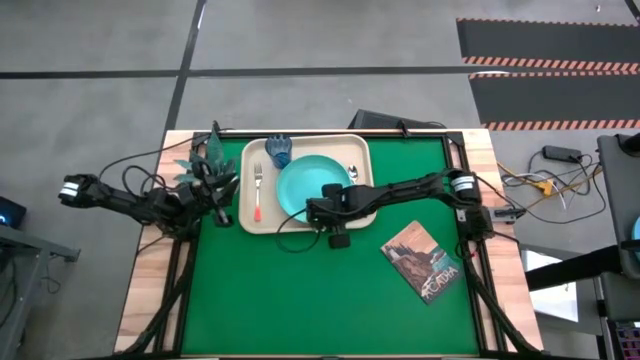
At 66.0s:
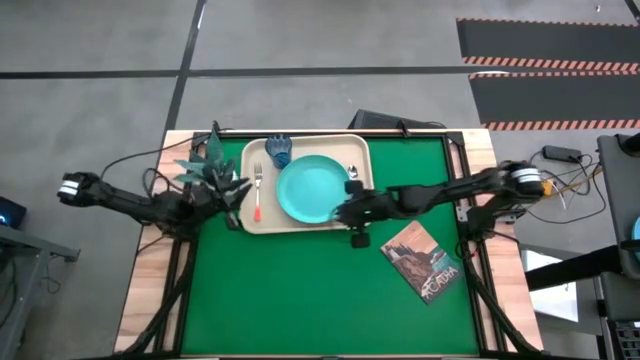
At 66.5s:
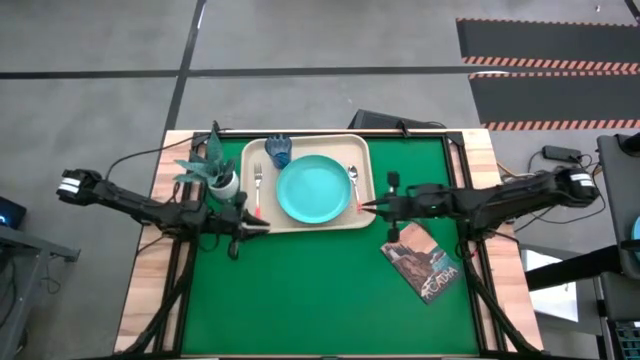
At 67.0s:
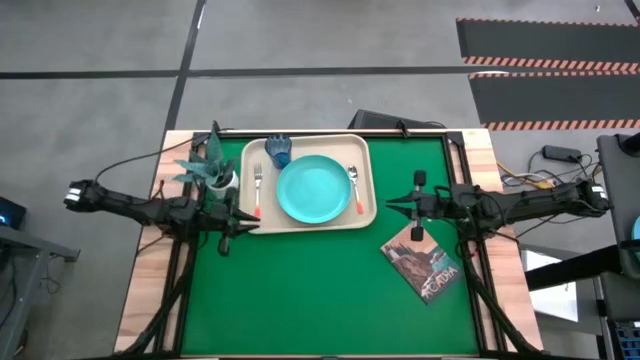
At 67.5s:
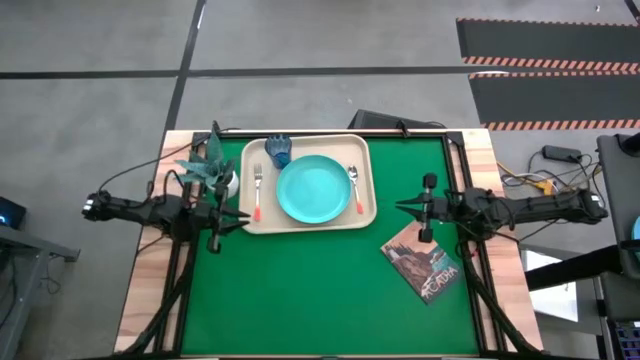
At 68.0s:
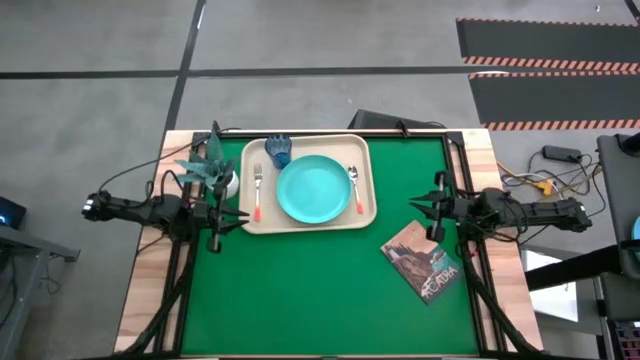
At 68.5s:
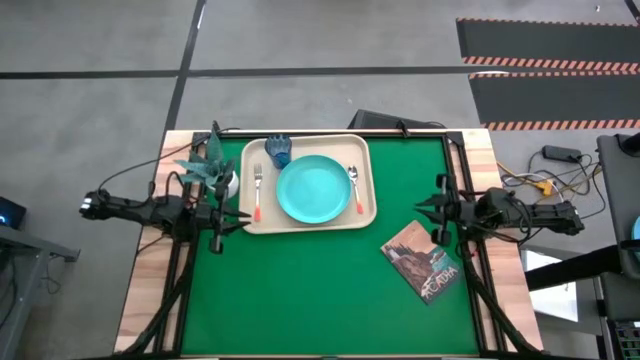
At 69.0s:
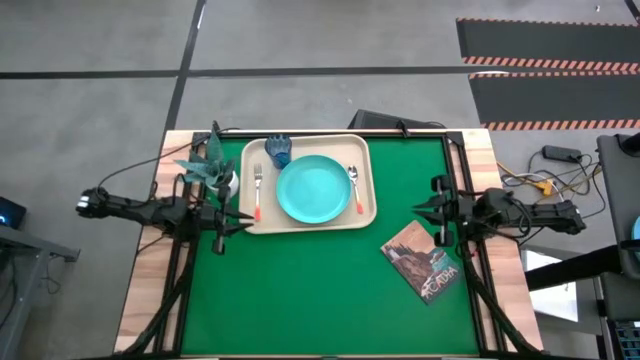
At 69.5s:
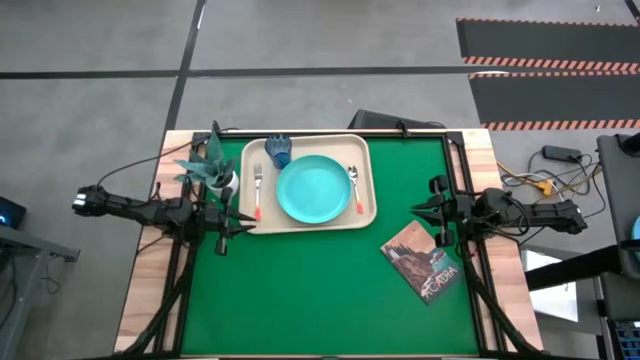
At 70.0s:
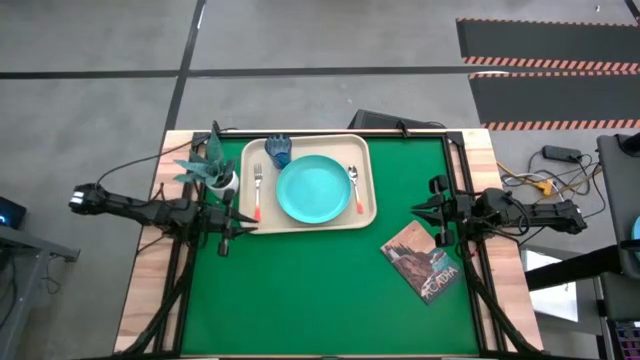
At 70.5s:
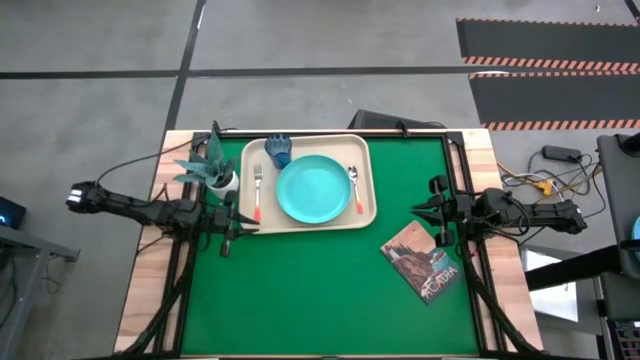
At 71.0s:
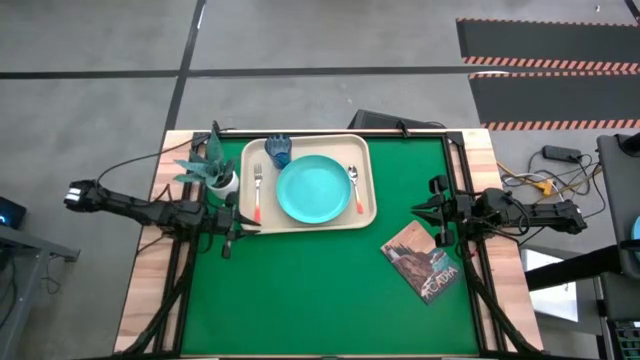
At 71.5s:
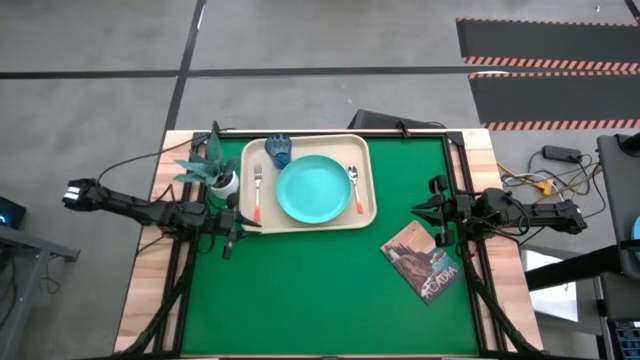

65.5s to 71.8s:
Task: Pick and place plate/cup/fork/spoon on tray
Return to Home Position

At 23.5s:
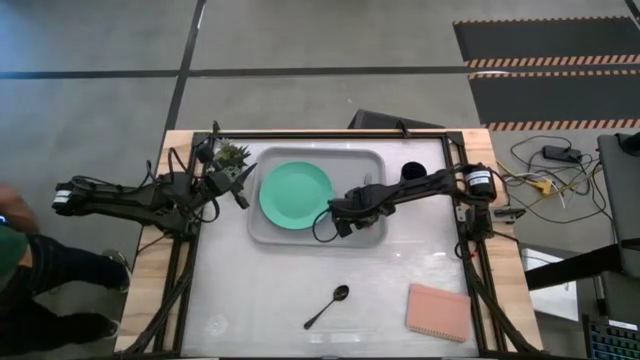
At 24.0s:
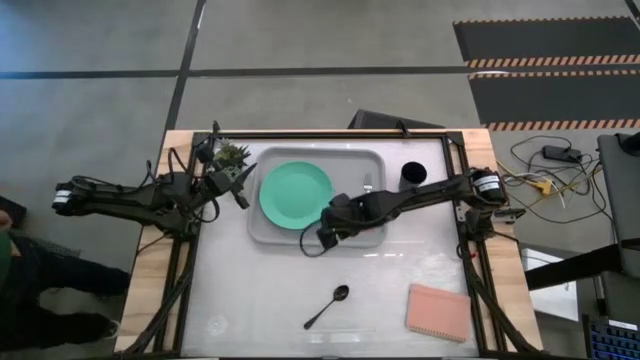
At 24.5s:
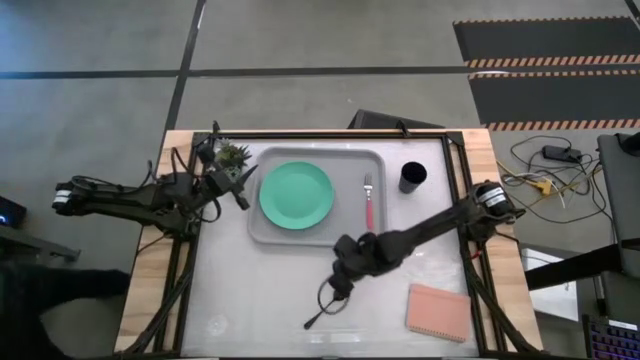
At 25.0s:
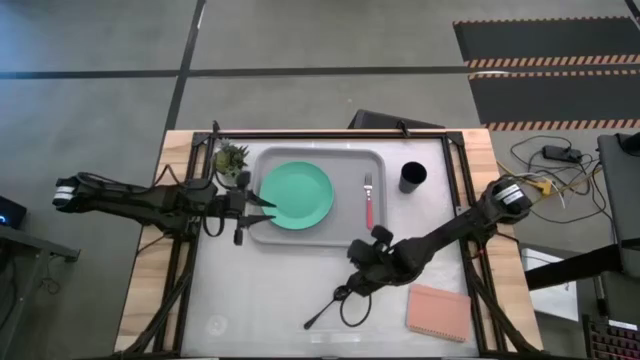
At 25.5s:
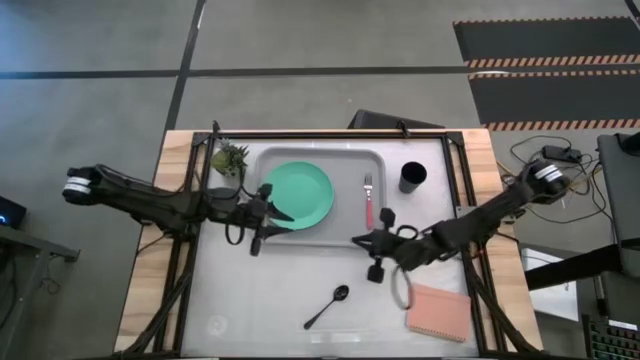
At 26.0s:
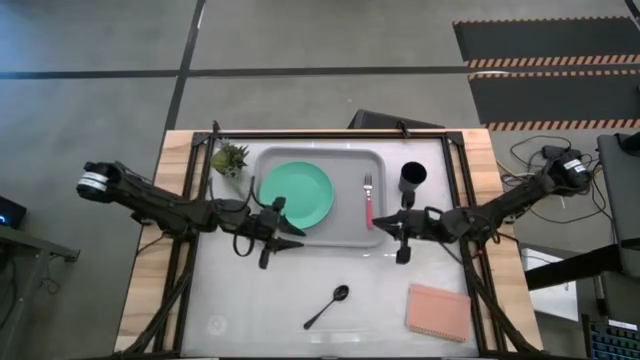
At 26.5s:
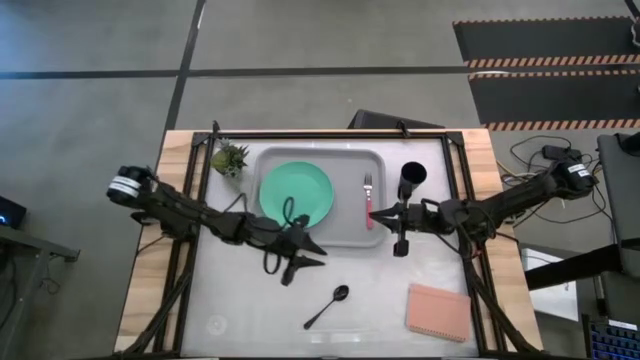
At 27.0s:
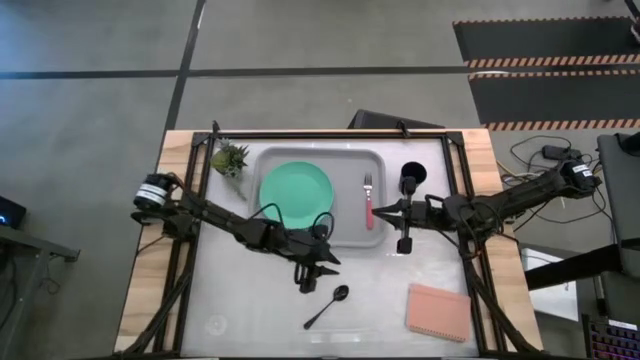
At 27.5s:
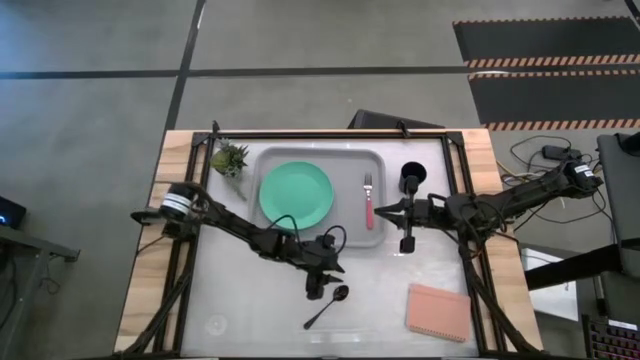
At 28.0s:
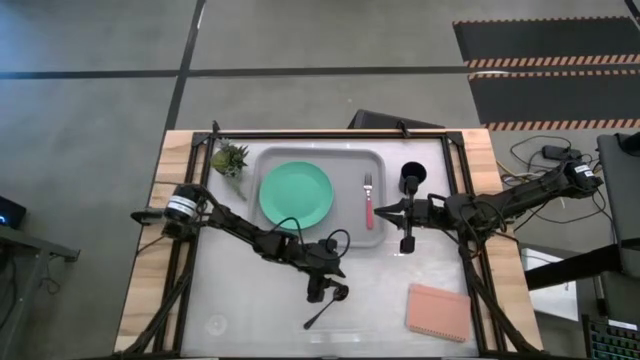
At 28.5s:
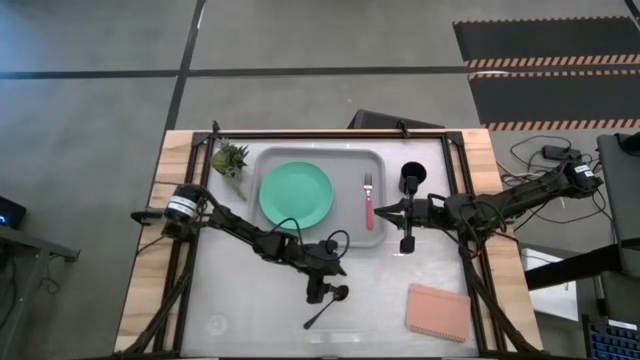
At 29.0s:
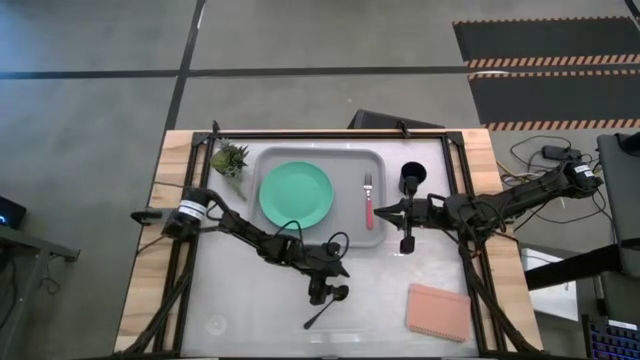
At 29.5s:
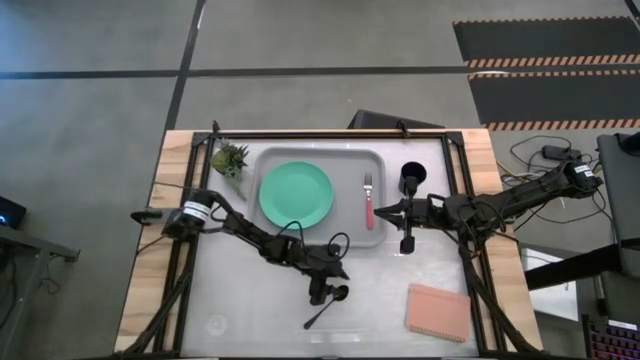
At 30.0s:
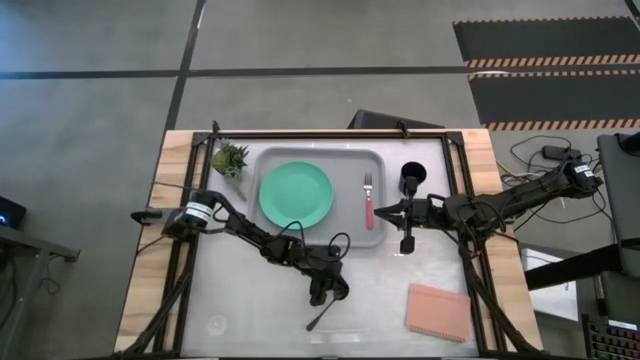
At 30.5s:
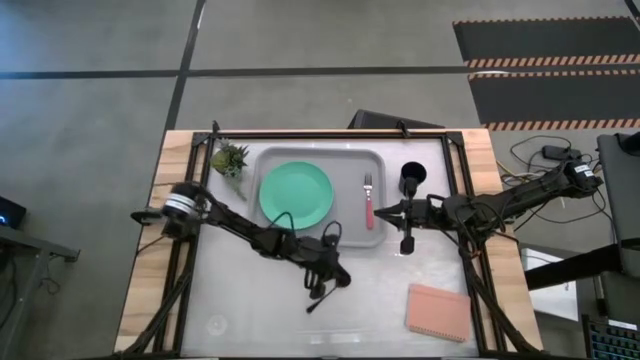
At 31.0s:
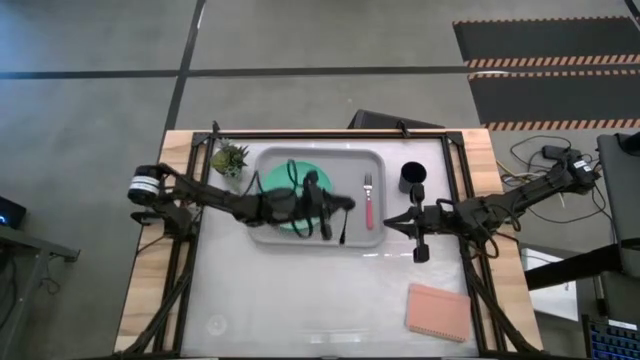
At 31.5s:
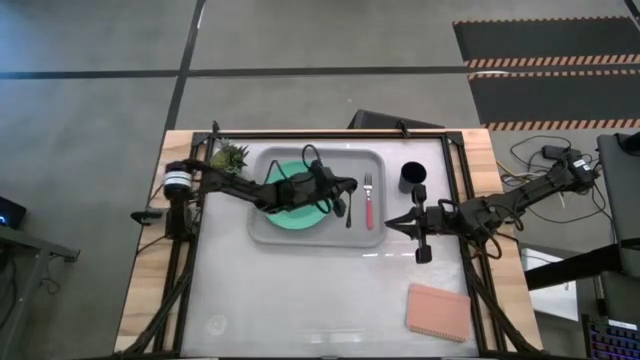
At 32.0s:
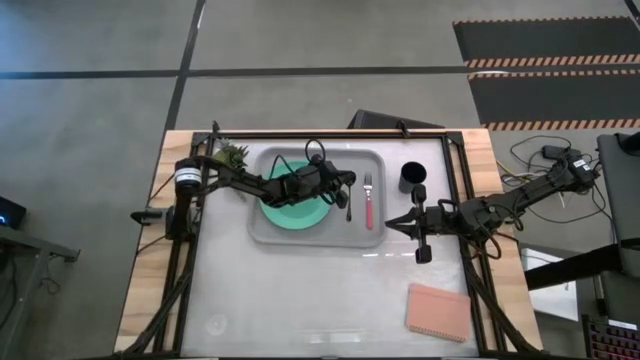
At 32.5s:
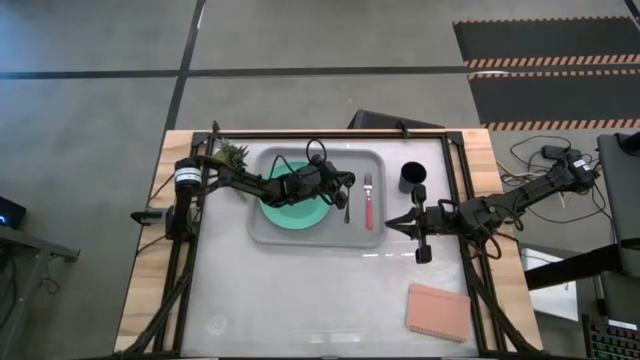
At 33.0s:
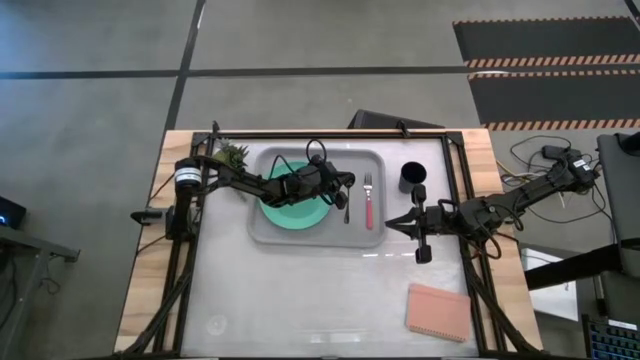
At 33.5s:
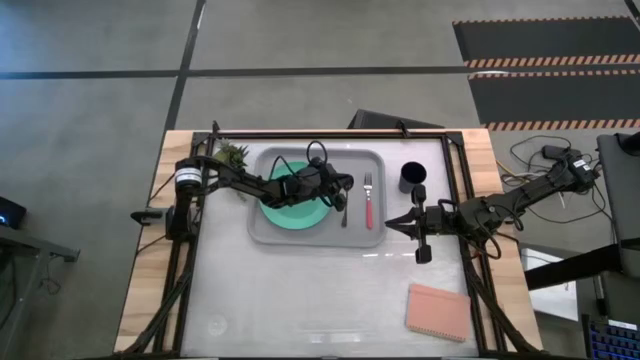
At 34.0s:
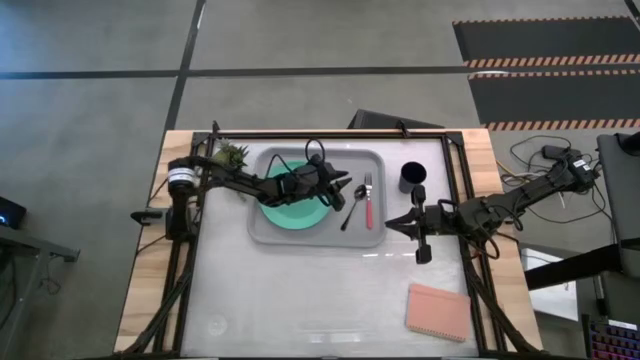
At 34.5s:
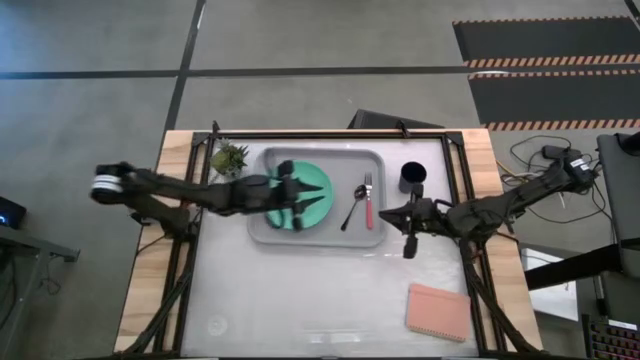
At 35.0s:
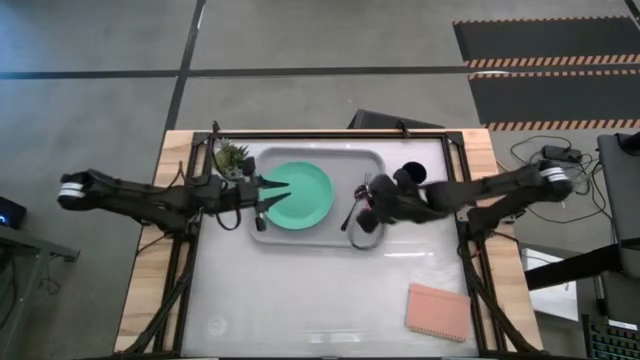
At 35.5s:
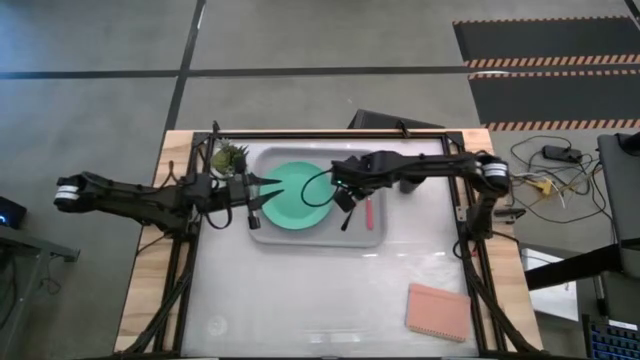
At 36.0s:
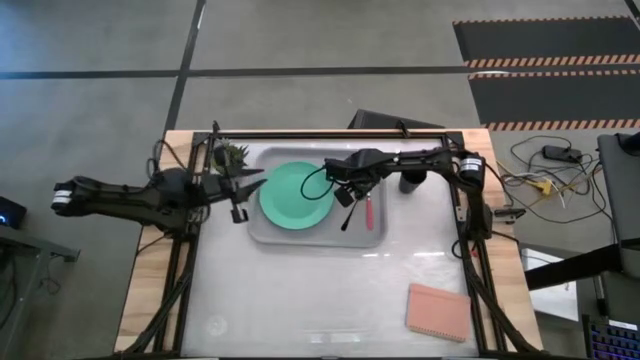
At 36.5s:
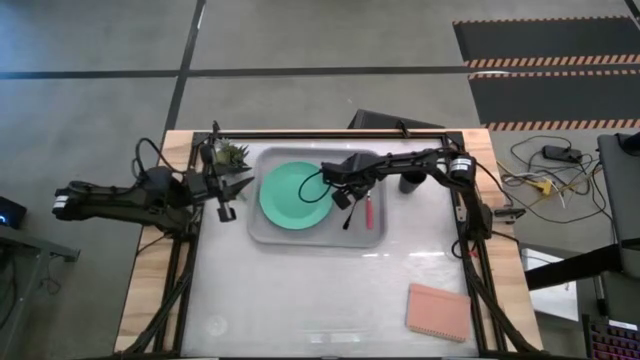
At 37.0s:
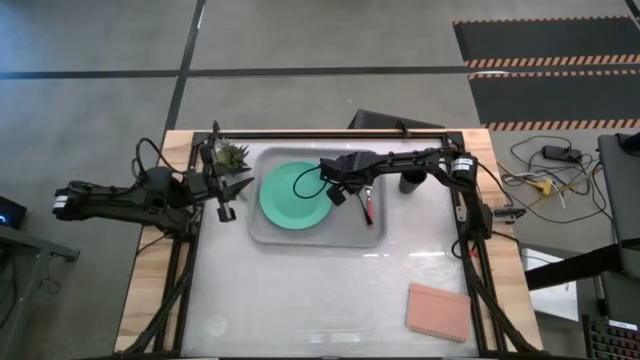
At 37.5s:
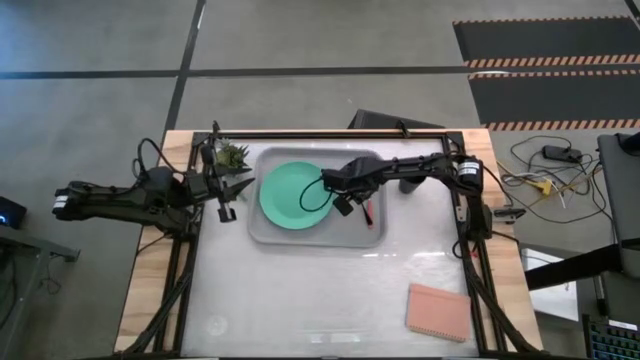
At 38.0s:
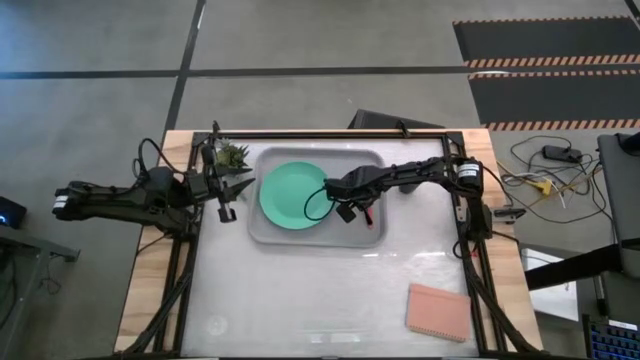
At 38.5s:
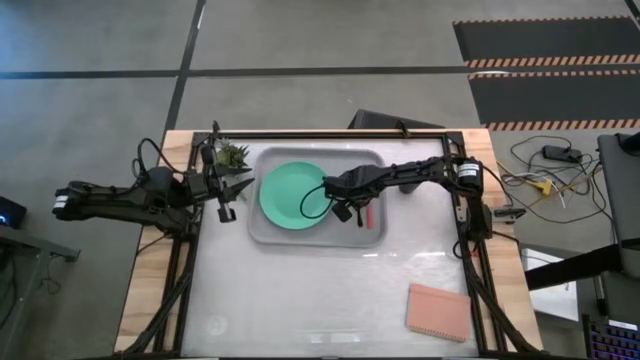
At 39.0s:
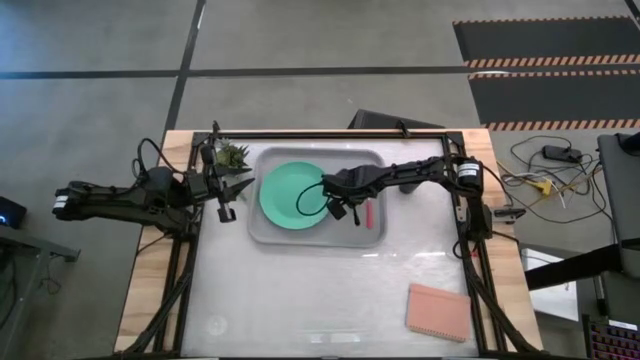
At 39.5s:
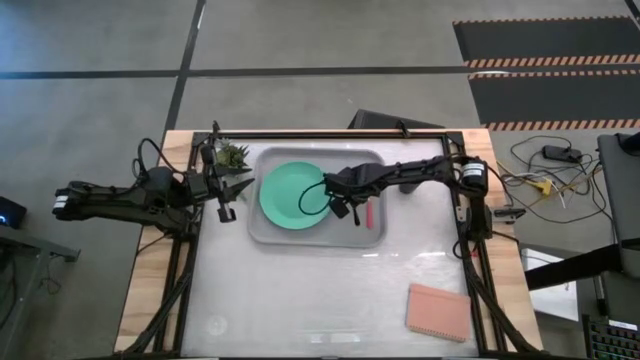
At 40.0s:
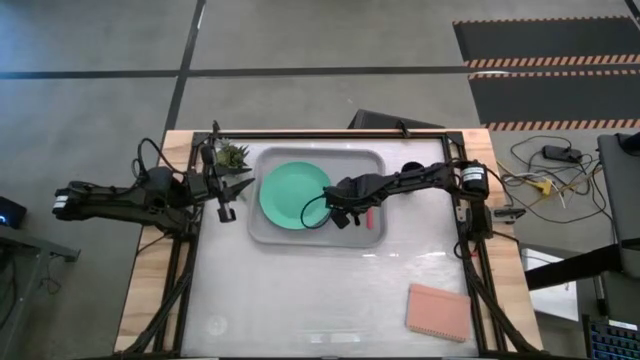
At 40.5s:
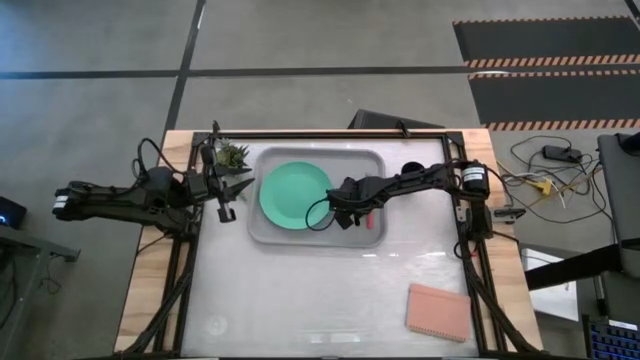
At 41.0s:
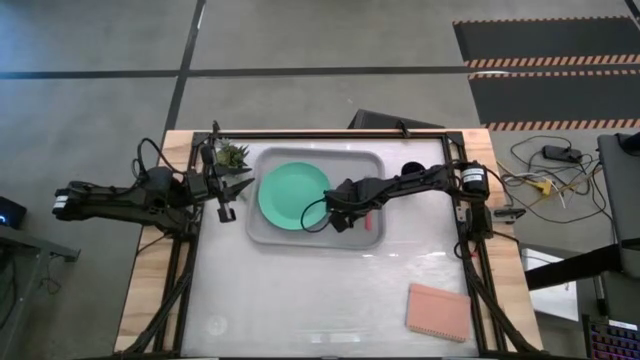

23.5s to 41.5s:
Task: Pick and place plate/cup/fork/spoon on tray
Put the black spoon on the gray tray to the right side of the light green plate
